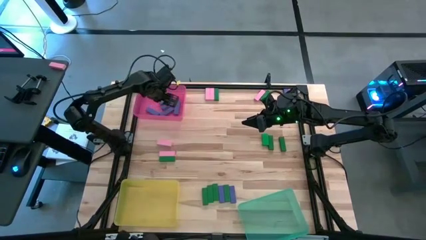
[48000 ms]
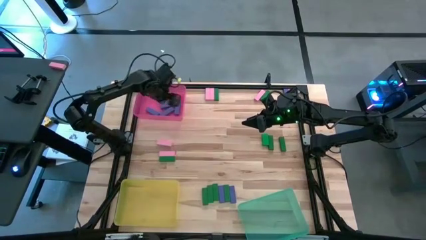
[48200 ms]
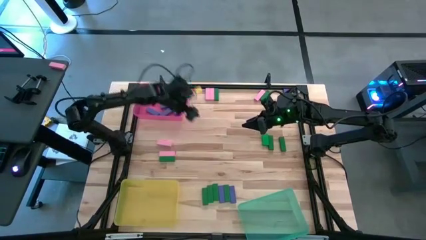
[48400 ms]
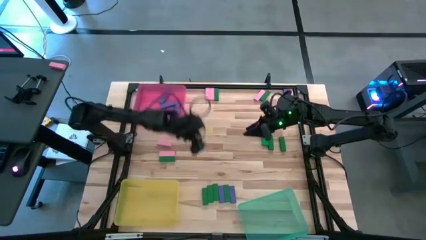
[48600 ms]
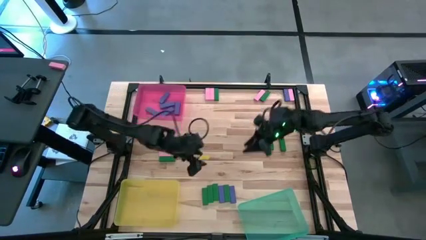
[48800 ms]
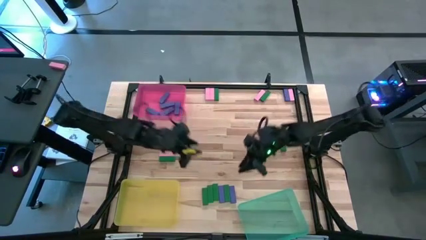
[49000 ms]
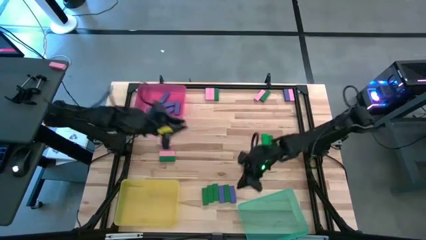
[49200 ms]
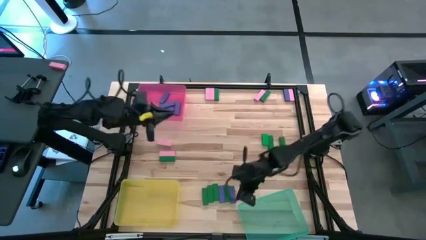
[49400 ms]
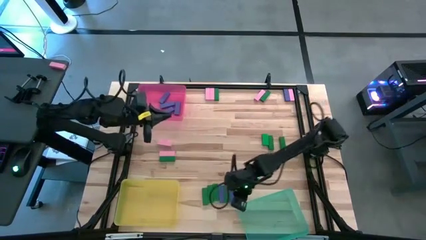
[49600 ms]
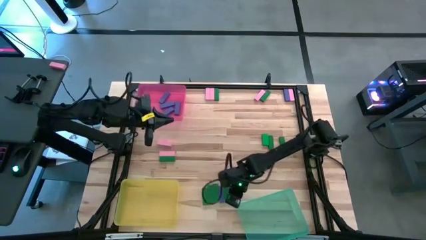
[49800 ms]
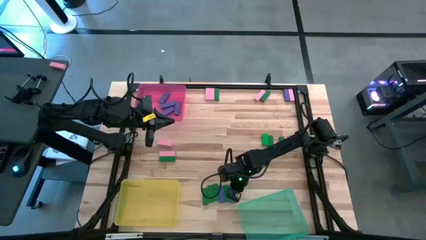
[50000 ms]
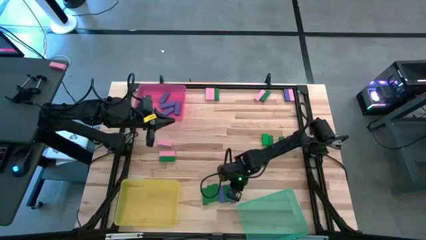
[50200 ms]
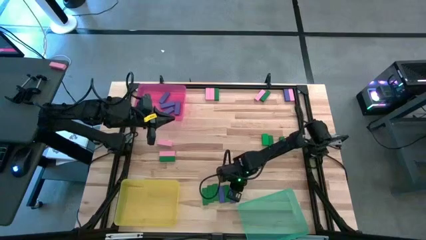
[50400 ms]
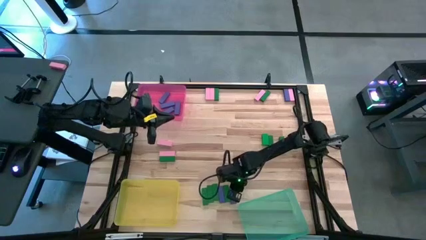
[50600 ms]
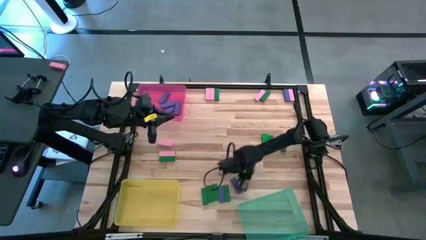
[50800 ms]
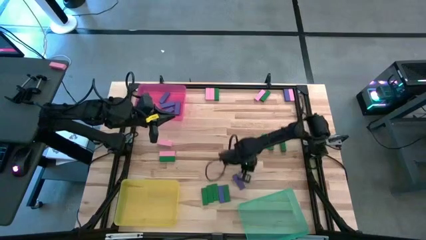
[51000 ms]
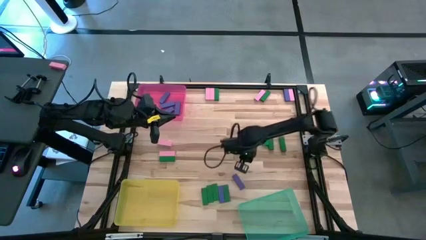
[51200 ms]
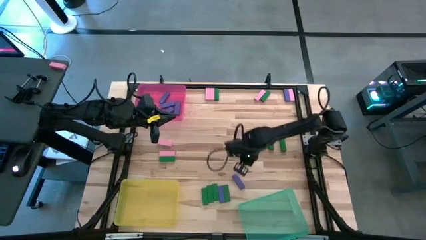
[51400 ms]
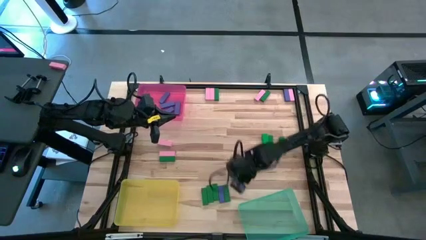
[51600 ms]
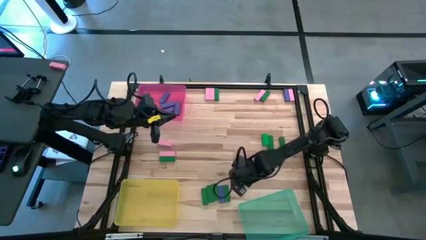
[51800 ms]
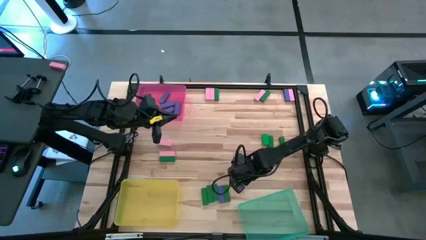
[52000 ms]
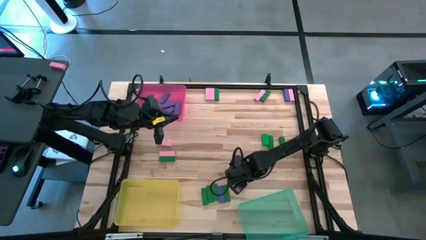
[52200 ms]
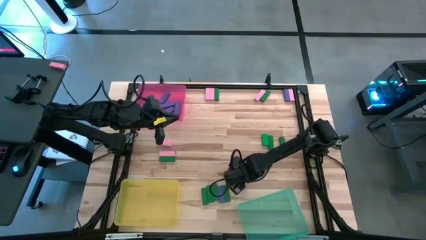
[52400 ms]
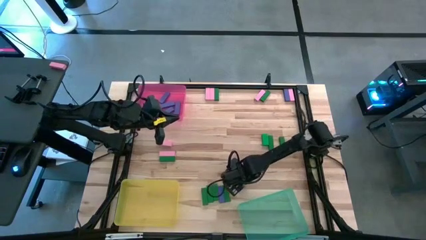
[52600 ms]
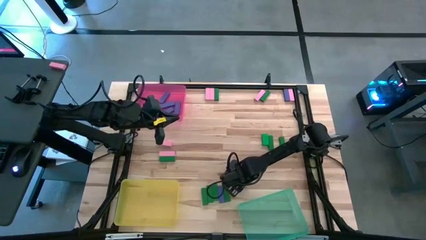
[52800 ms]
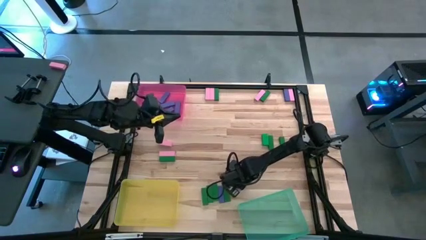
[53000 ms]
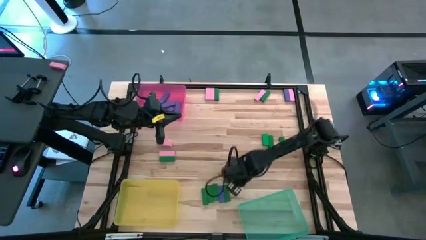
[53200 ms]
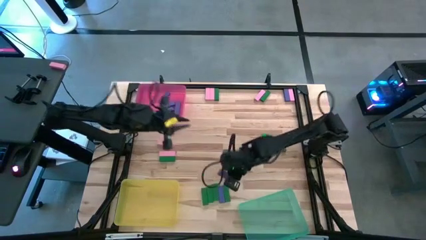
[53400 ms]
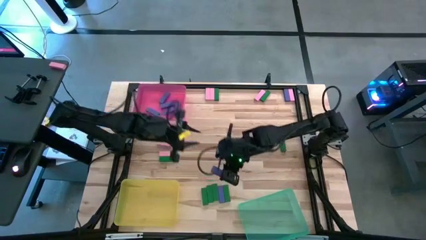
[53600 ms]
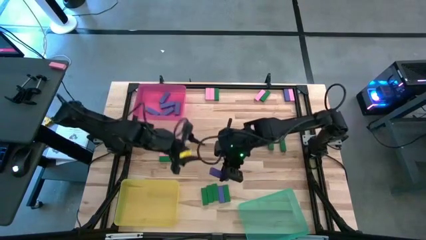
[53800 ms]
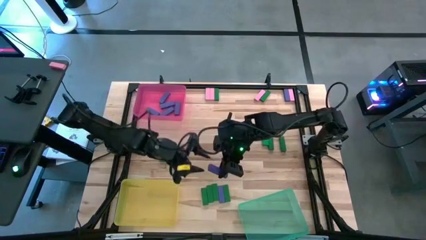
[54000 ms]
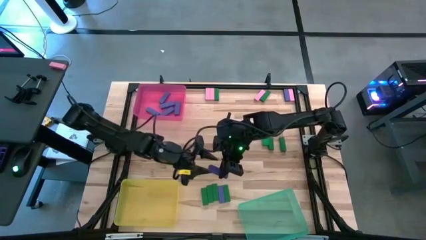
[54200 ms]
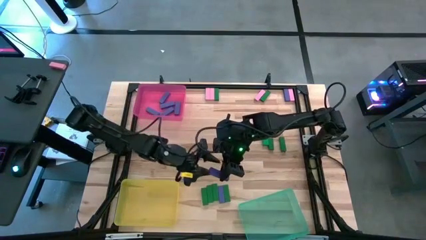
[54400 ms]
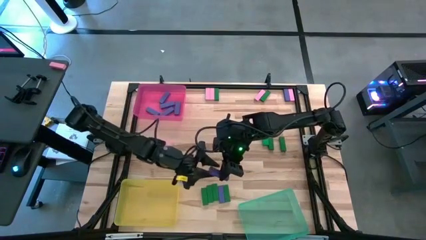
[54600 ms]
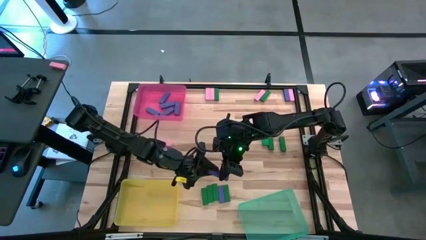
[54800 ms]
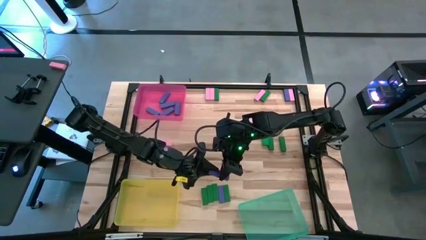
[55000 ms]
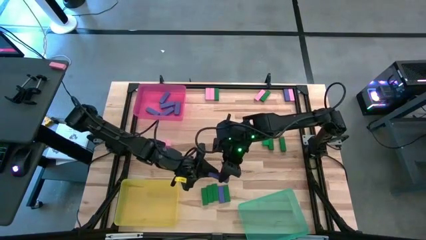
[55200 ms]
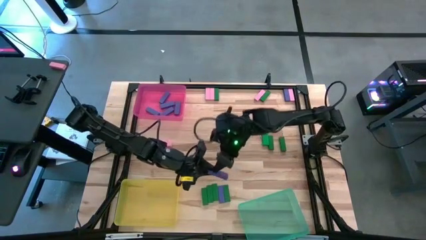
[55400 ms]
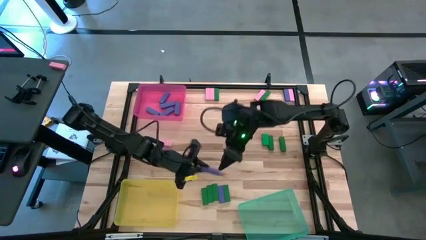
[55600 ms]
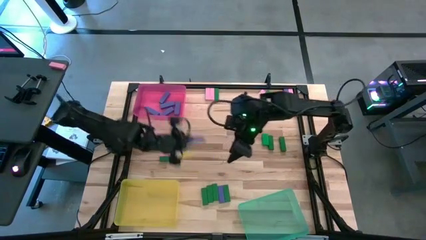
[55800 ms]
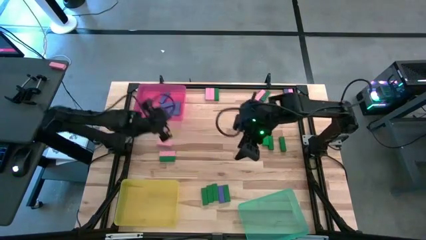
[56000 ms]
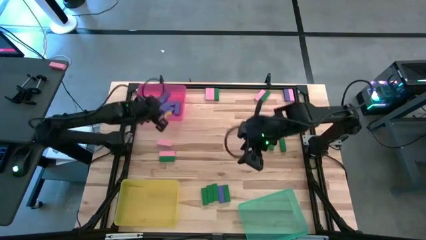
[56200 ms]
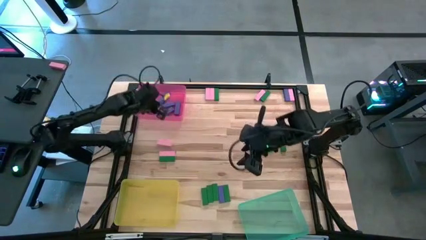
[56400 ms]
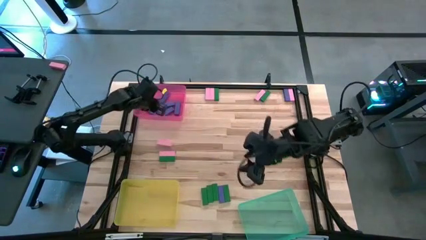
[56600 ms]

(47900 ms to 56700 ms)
Task: Sort blocks
Put the violet block into the pink bin

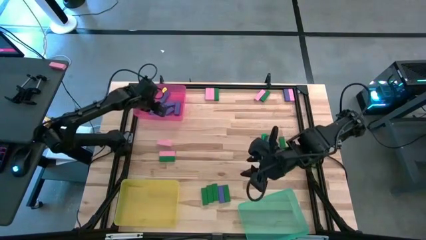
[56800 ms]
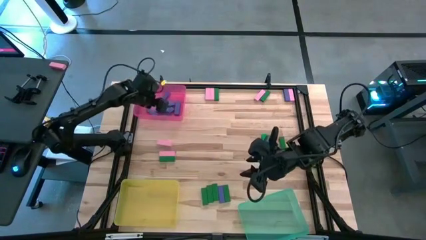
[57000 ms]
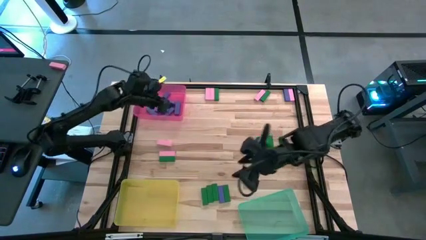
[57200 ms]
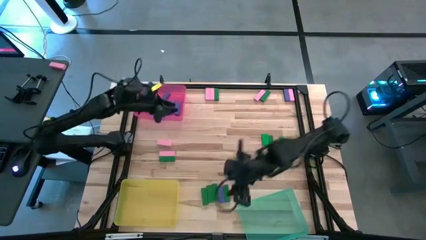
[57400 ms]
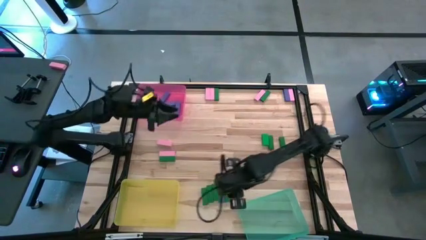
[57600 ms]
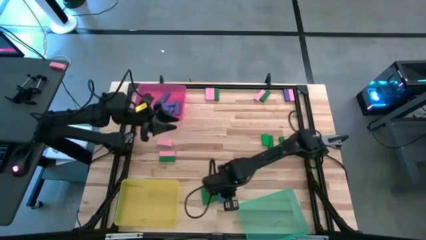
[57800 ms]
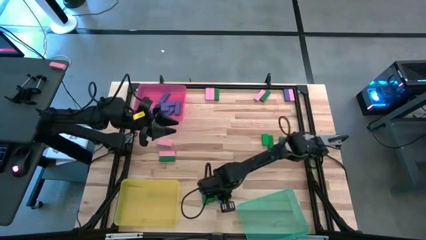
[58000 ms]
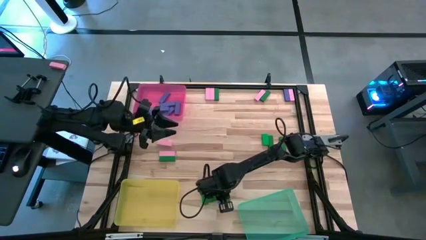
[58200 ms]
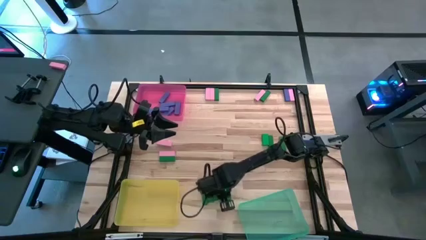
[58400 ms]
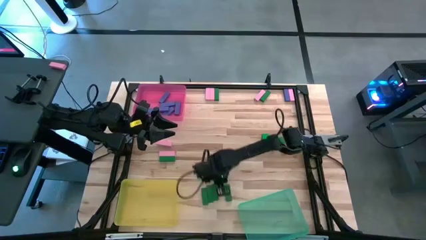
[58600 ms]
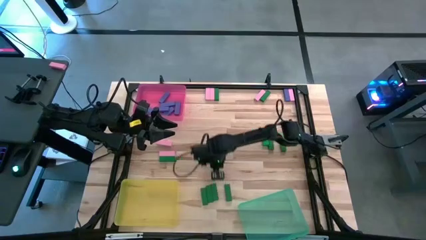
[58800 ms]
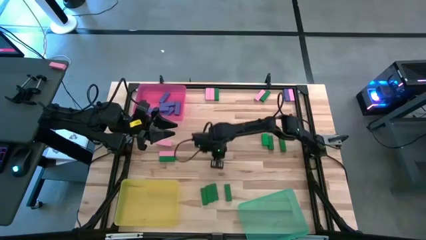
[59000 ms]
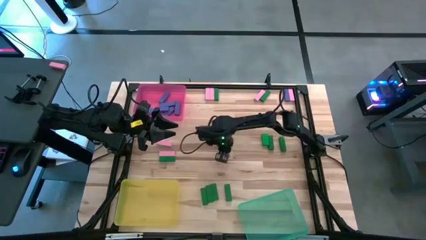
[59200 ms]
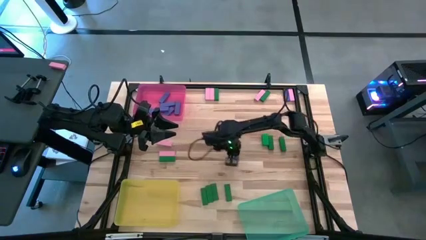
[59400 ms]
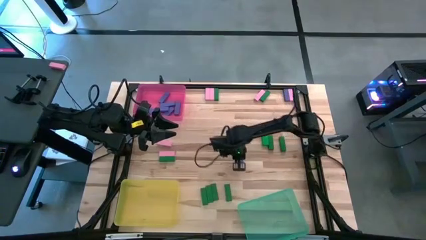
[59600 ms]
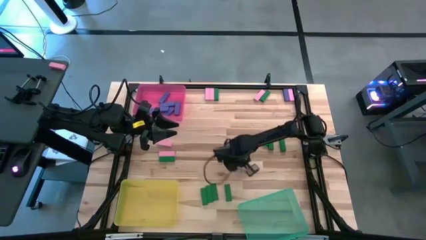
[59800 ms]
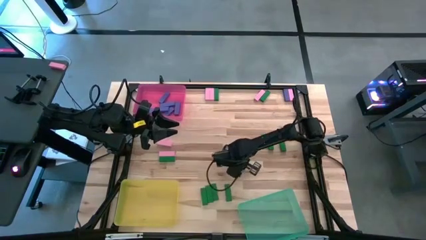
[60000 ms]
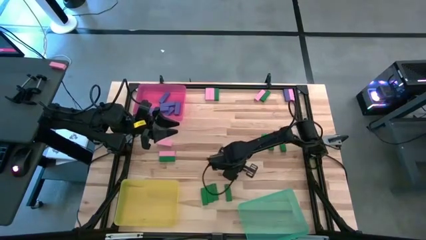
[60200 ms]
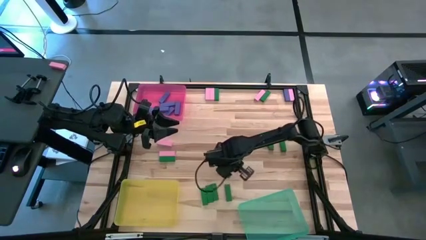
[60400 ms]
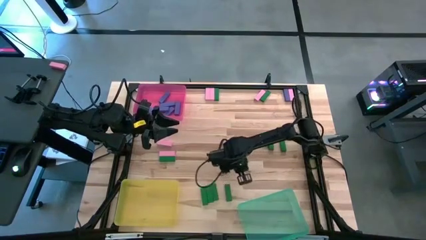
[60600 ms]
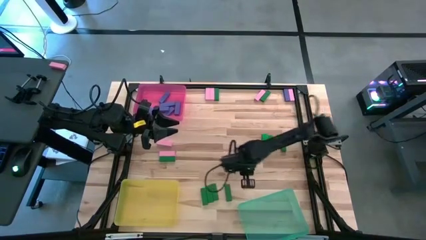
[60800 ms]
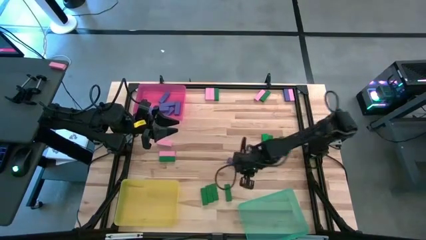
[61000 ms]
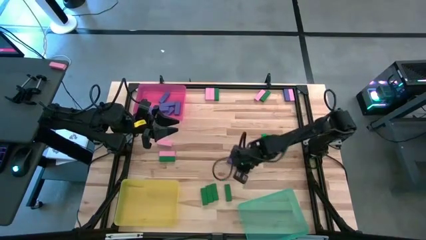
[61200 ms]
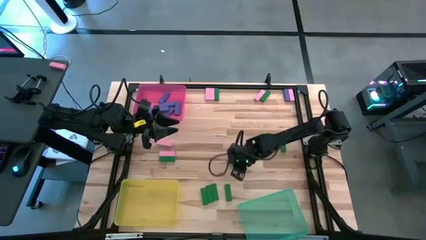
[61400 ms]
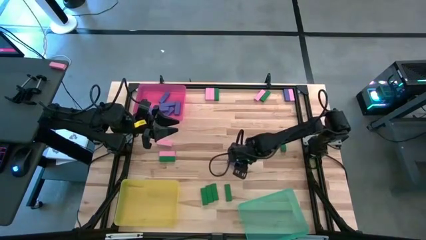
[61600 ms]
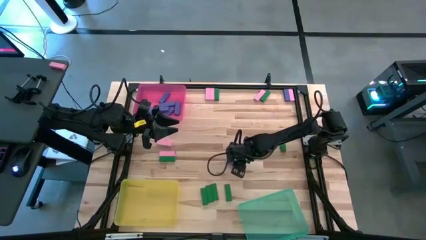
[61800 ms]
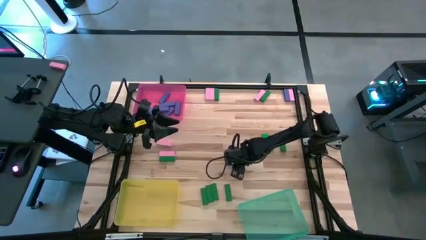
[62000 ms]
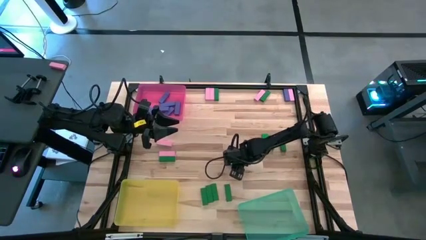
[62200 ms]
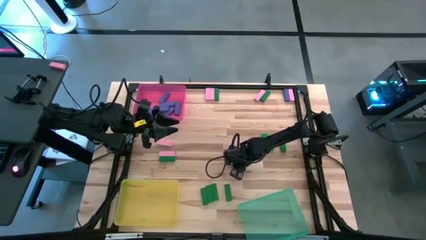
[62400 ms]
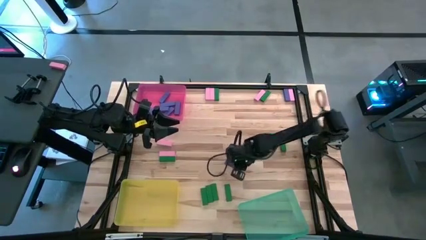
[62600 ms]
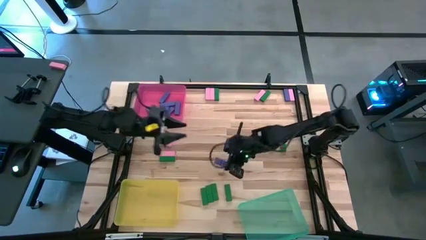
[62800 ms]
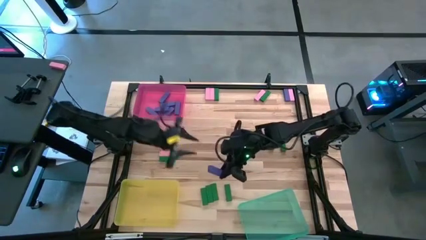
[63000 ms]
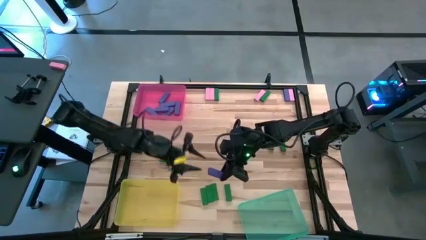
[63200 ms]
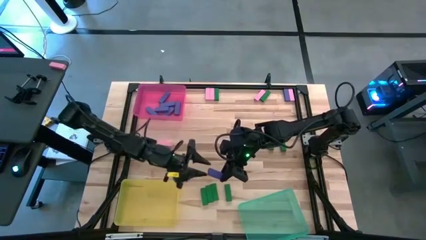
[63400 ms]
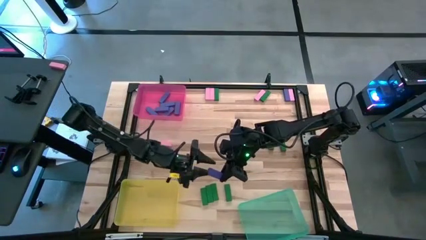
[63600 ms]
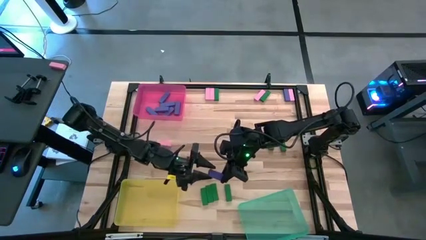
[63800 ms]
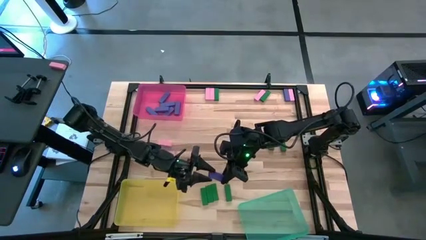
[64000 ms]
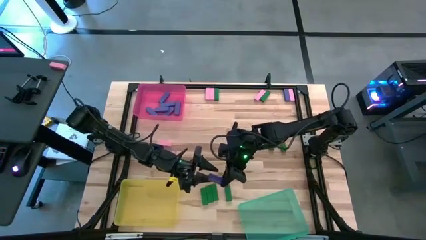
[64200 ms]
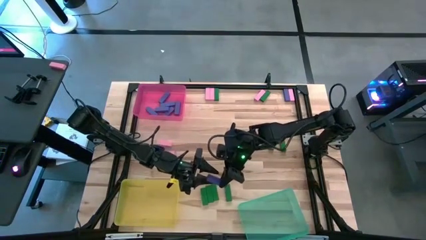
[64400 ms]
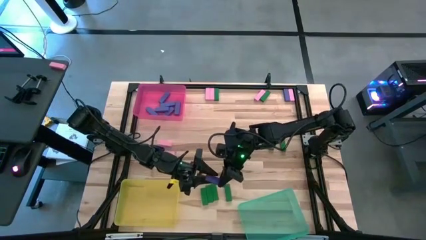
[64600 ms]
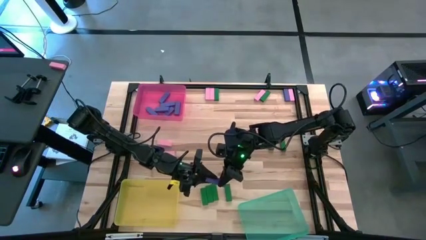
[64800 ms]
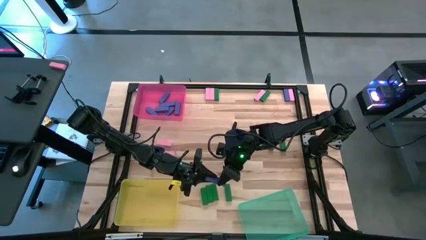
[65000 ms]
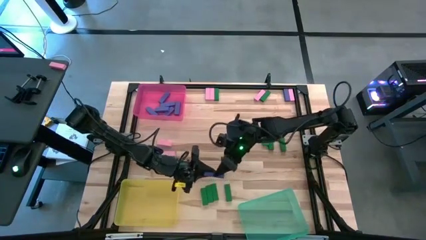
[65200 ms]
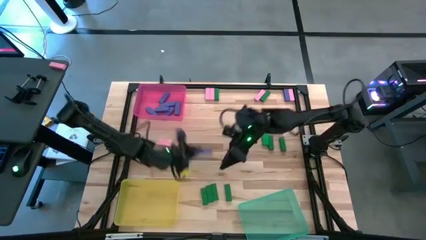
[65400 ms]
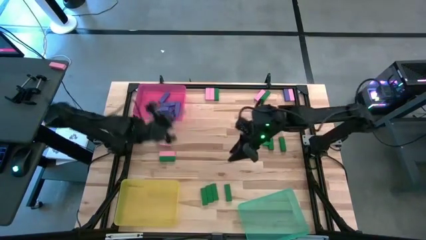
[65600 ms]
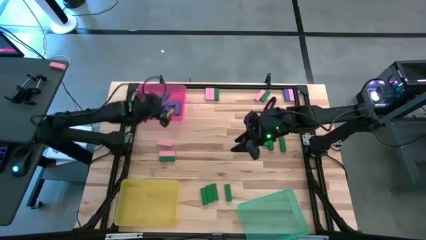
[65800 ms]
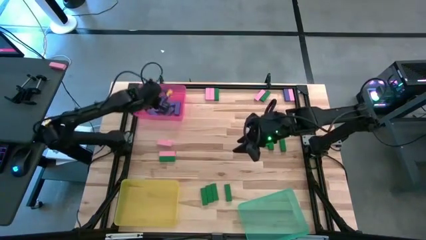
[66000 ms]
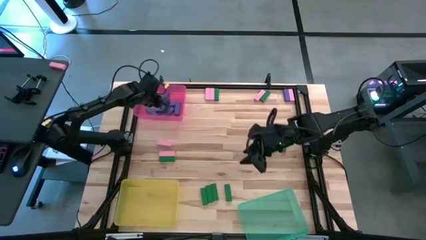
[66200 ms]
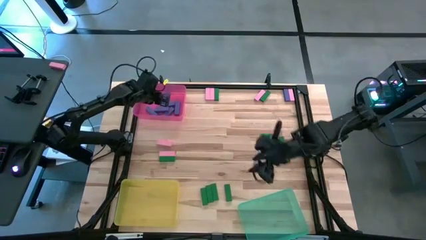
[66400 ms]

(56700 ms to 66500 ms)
Put the violet block into the pink bin
